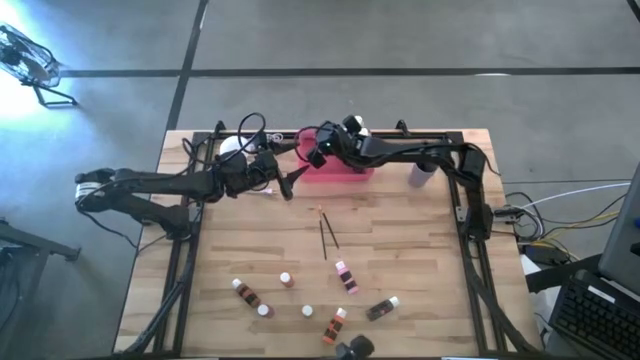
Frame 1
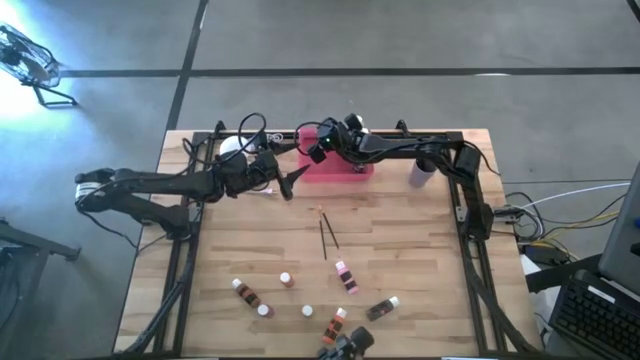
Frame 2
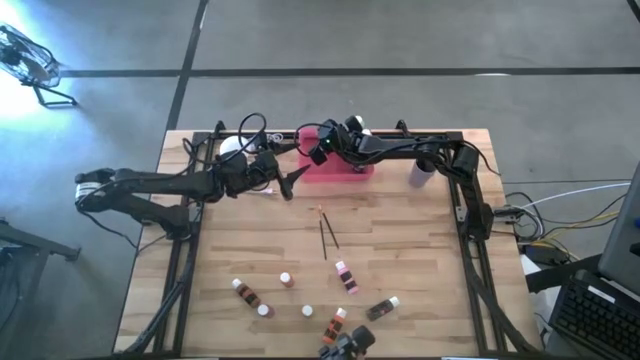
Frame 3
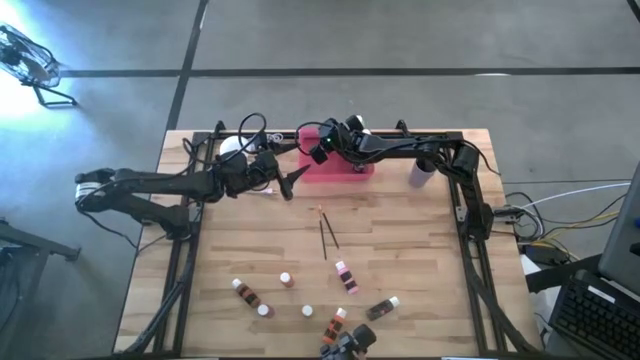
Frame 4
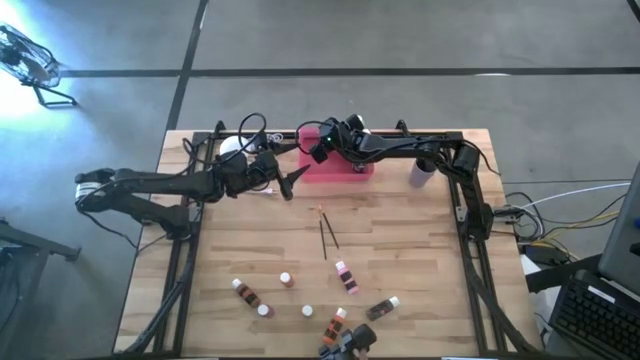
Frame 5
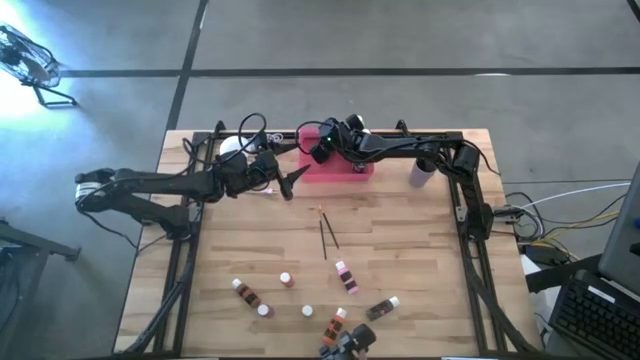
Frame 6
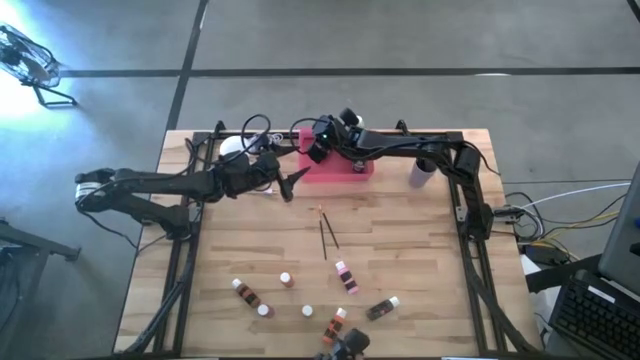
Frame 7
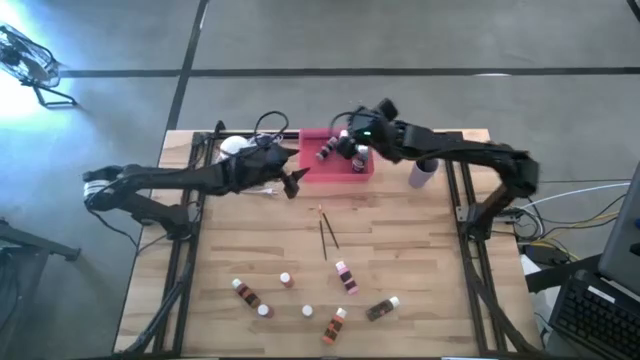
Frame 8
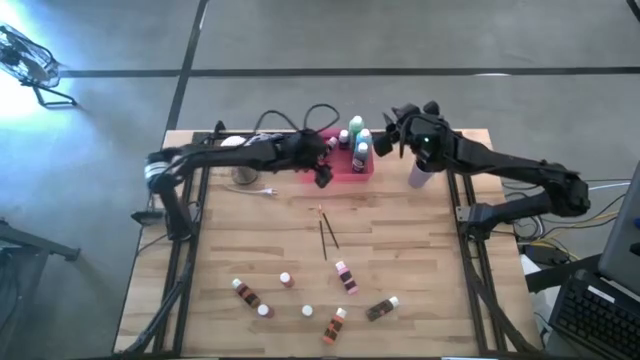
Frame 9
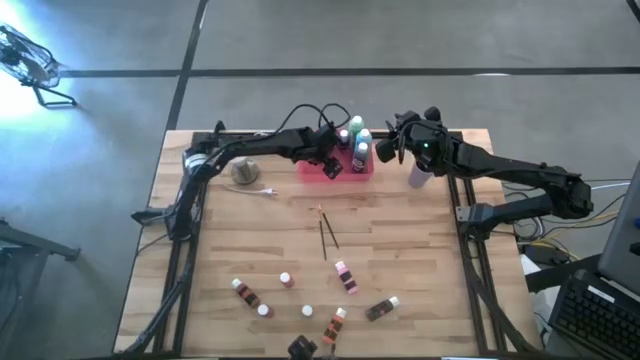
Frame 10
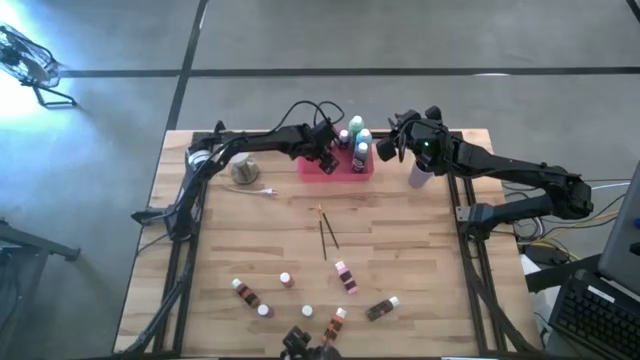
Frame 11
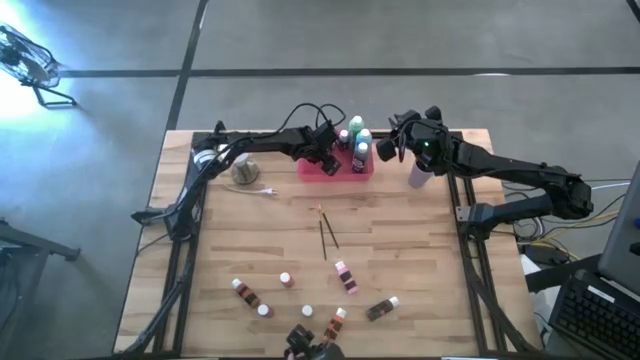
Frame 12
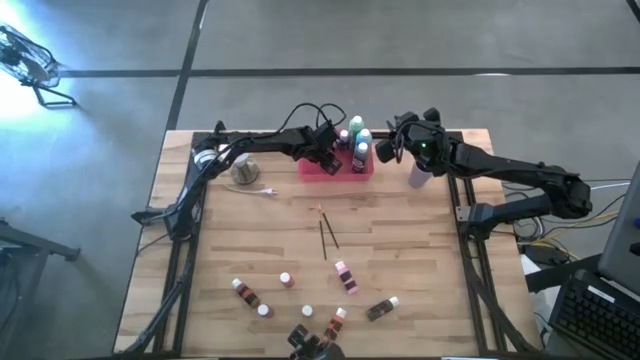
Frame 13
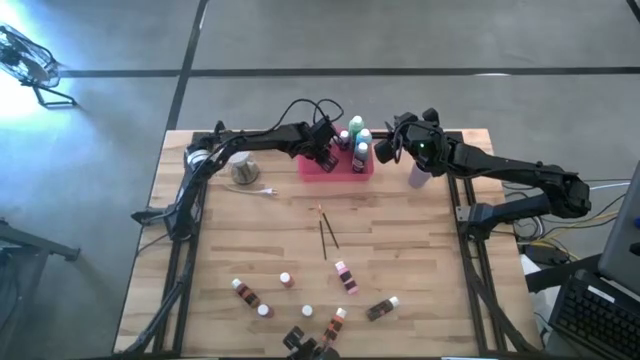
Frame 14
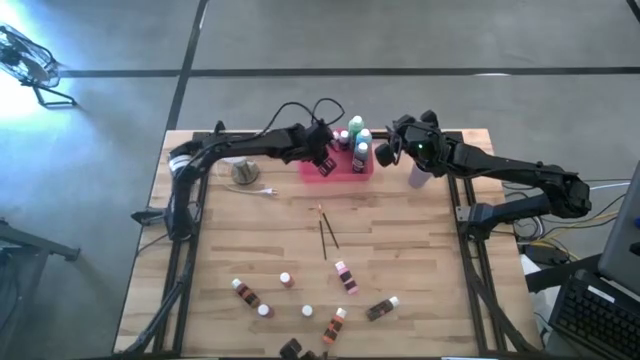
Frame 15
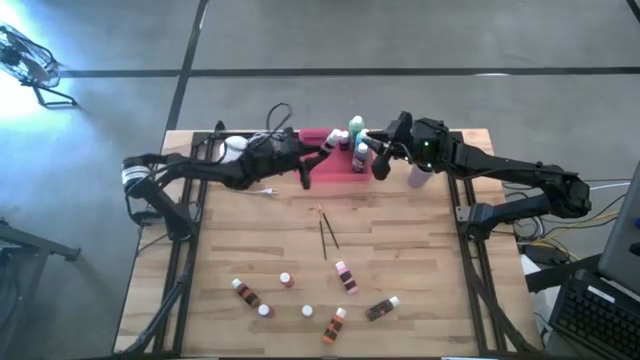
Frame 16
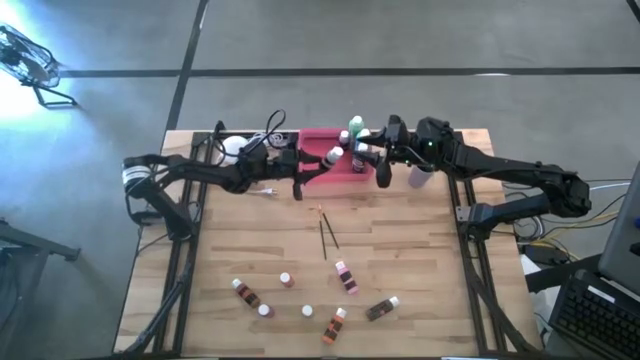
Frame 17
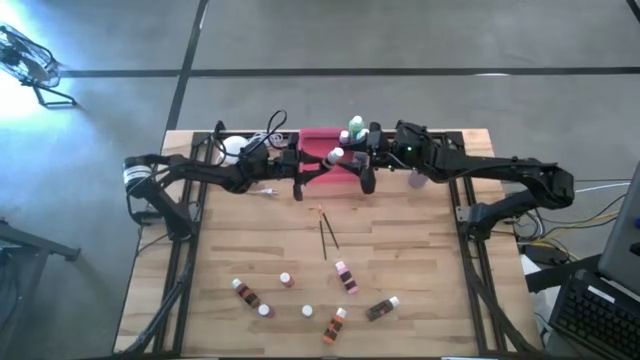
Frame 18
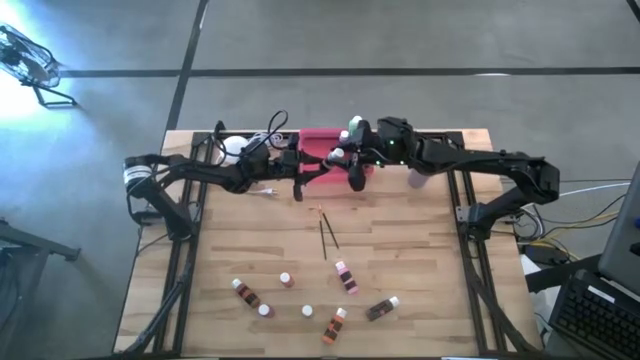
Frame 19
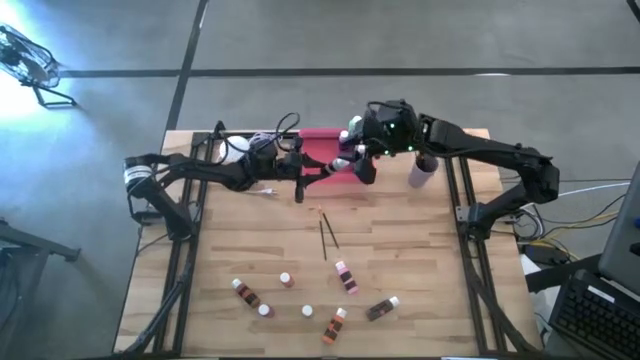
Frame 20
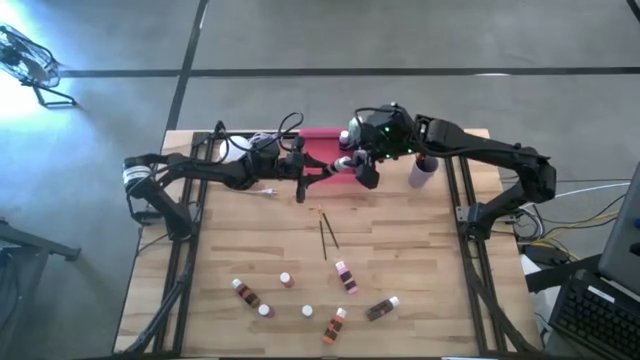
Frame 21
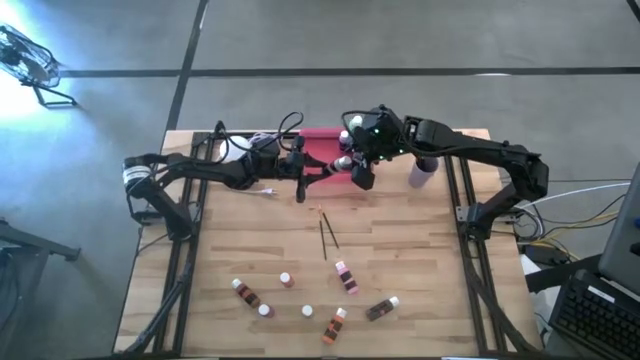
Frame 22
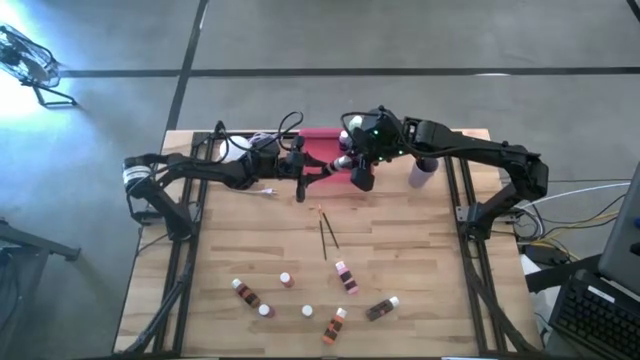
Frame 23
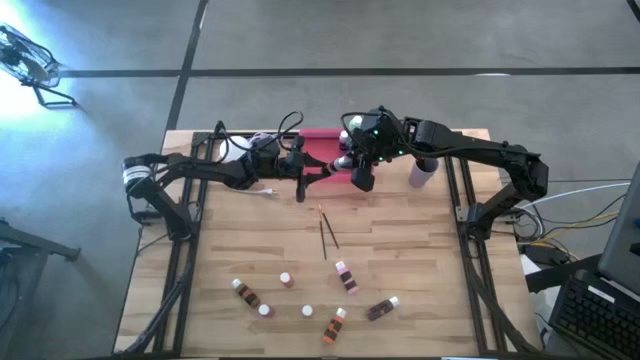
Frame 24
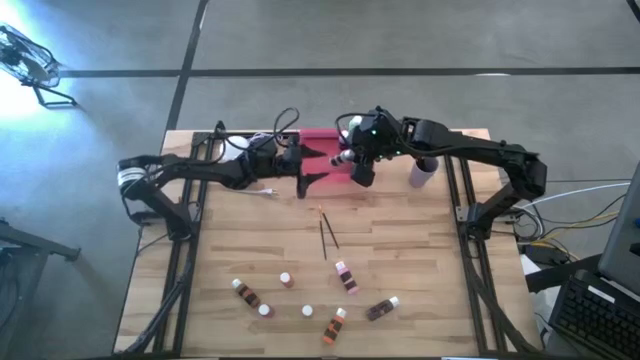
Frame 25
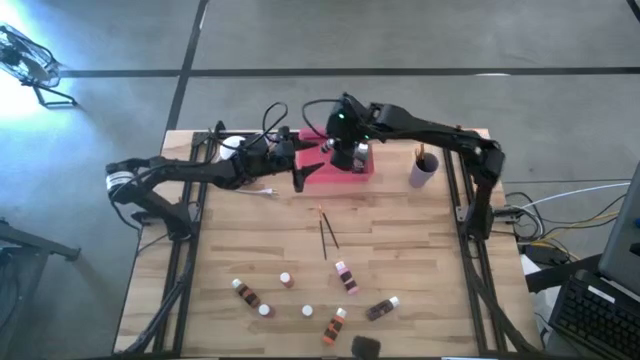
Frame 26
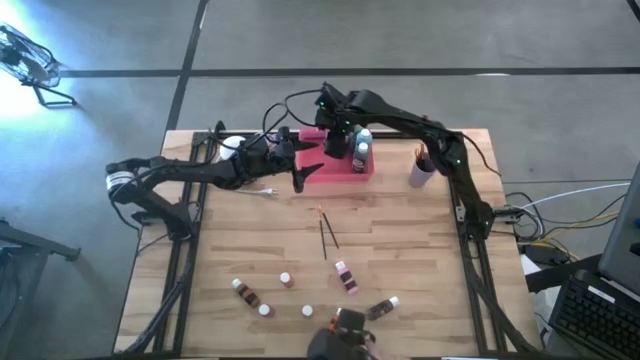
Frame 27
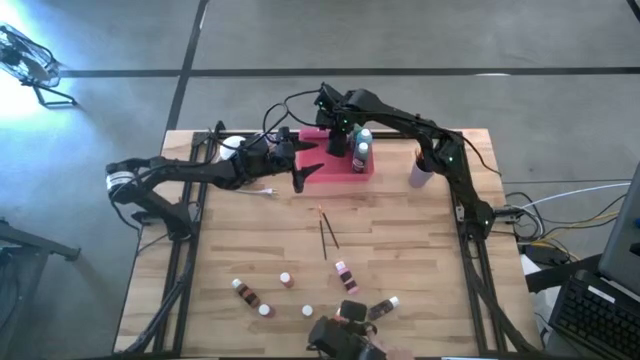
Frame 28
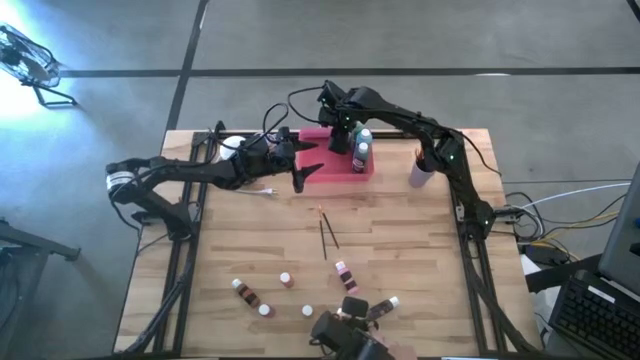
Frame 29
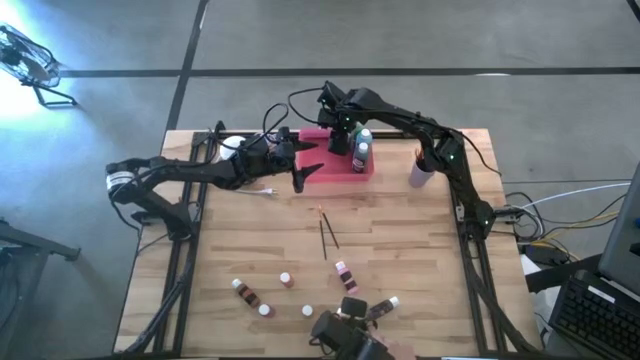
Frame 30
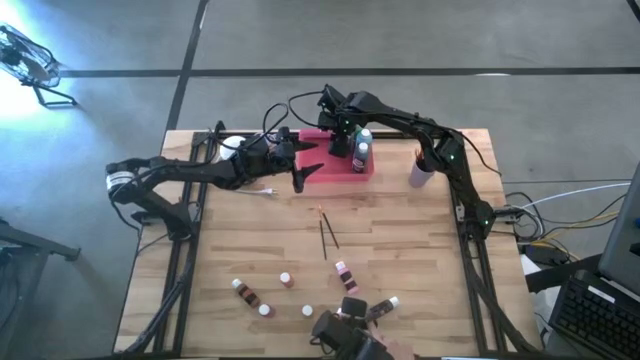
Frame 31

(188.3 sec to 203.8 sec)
Task: Pick & Place Paint Supplies
Put the grey black paint bottle into the pink bin

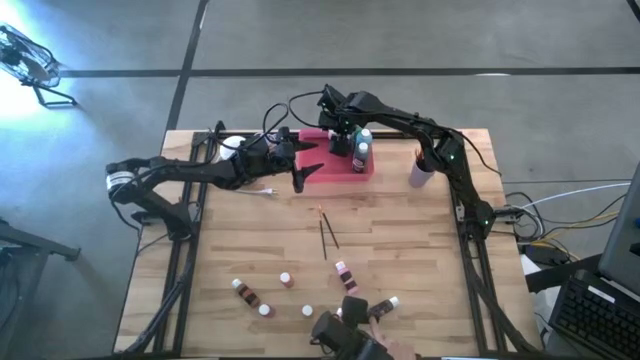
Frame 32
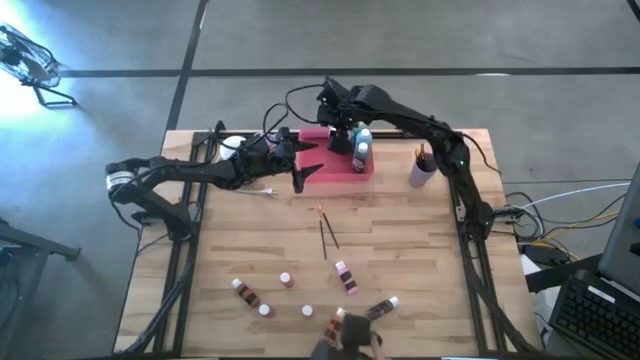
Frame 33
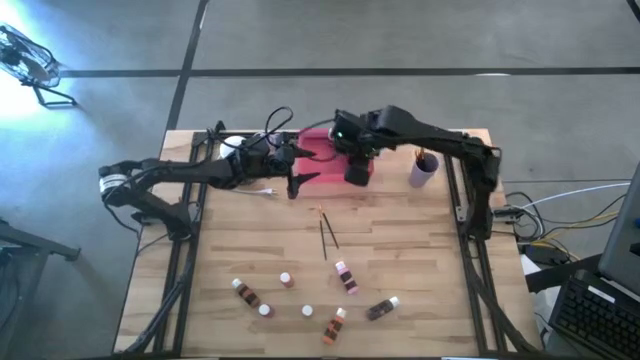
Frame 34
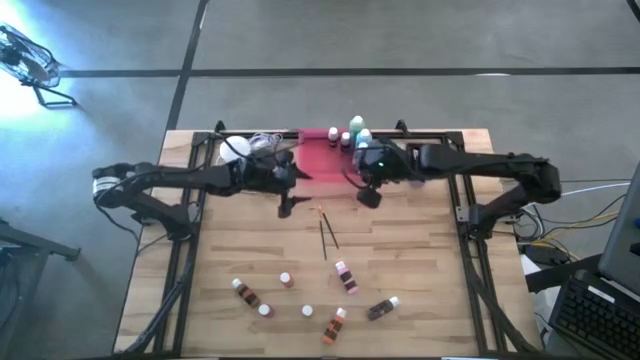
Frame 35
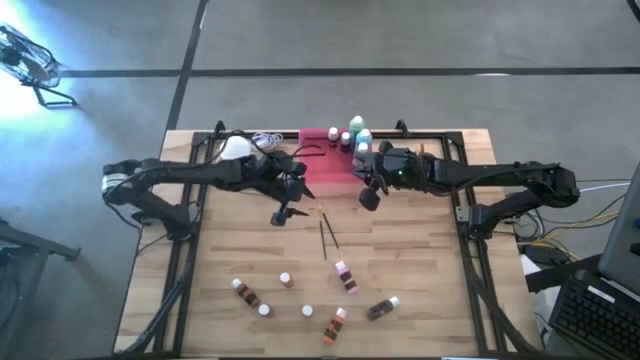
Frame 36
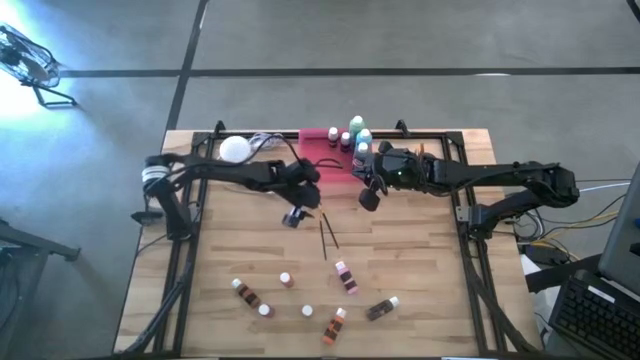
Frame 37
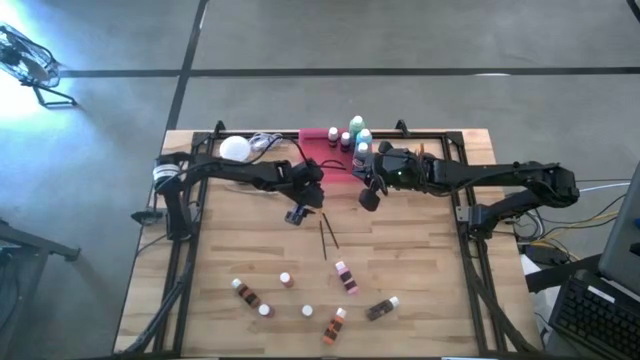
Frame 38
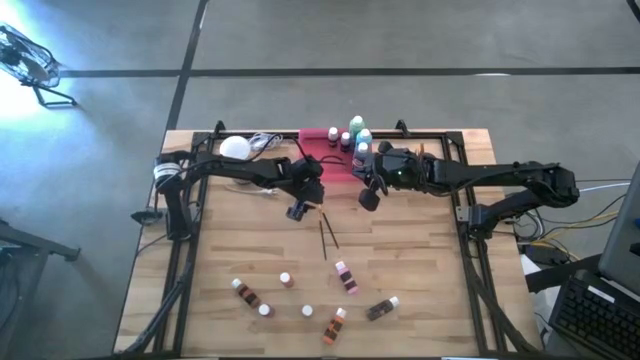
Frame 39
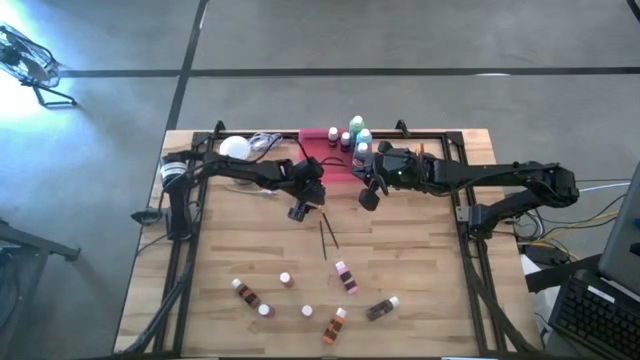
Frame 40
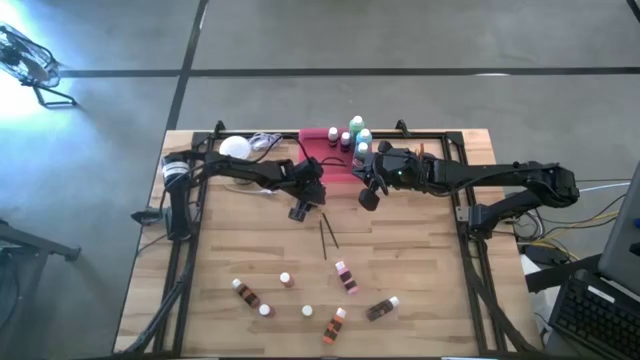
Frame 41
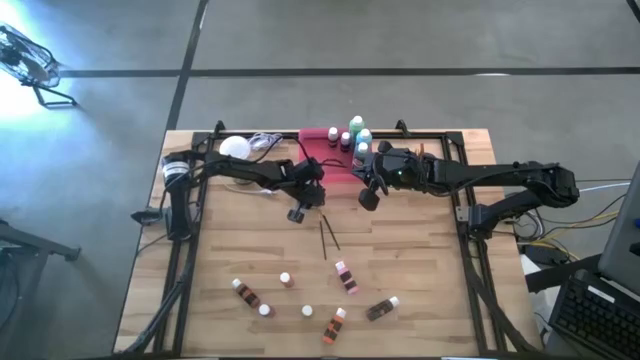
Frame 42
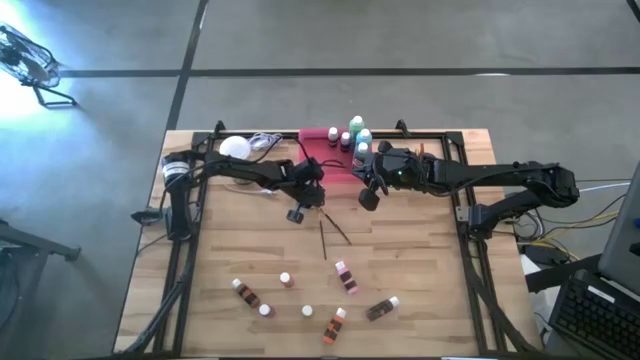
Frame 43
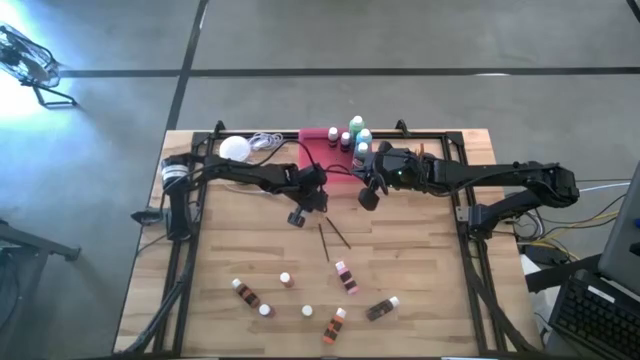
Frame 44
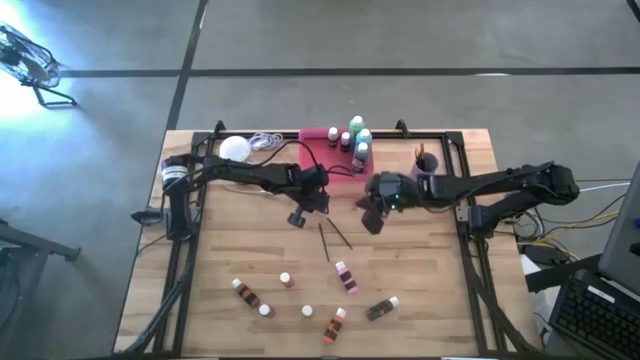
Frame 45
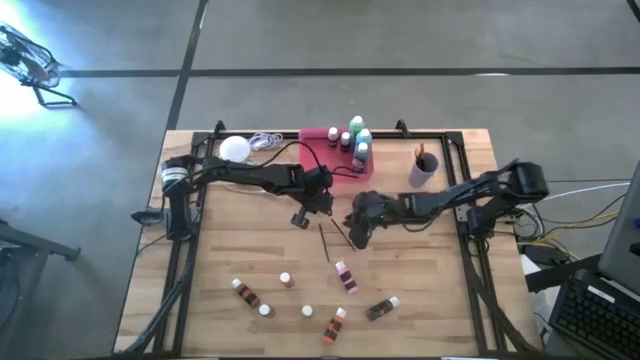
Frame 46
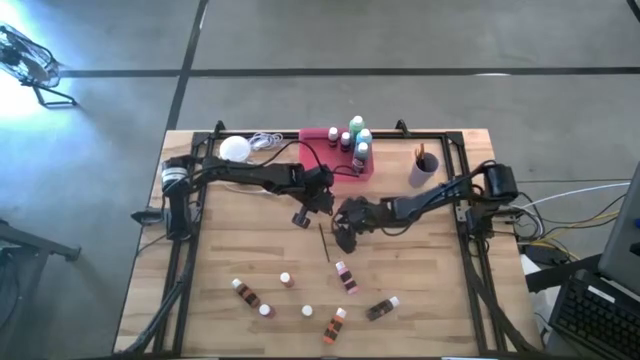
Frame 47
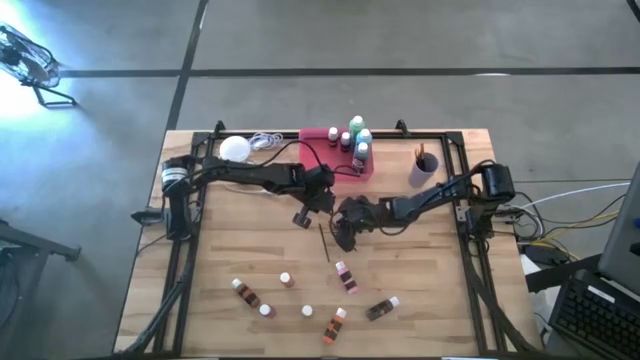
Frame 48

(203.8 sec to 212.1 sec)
Put the black gold paint brush into the violet cup
